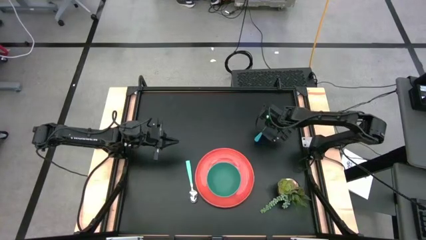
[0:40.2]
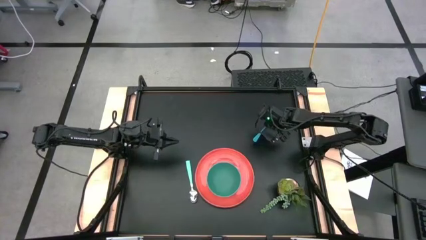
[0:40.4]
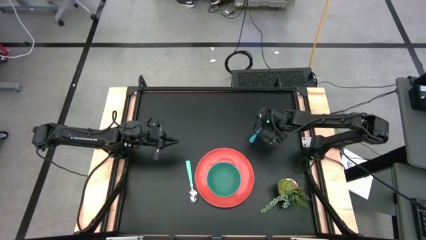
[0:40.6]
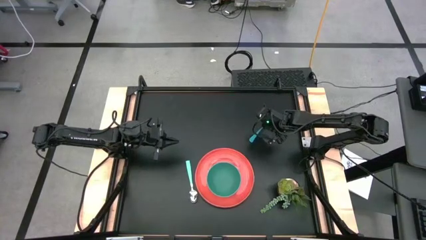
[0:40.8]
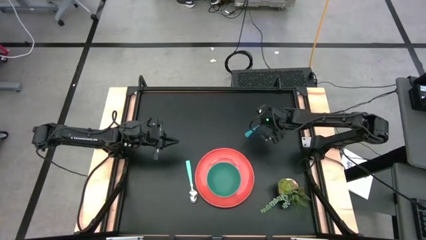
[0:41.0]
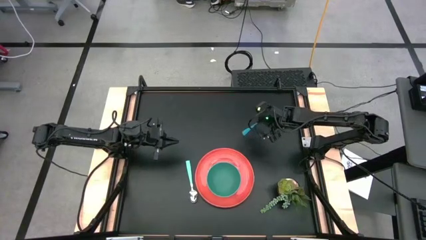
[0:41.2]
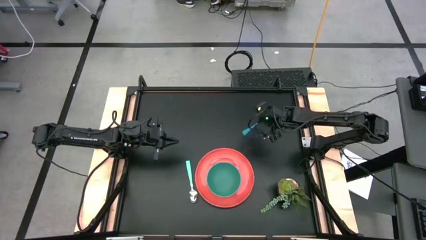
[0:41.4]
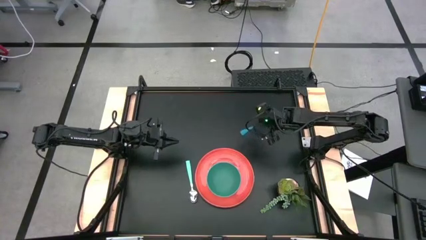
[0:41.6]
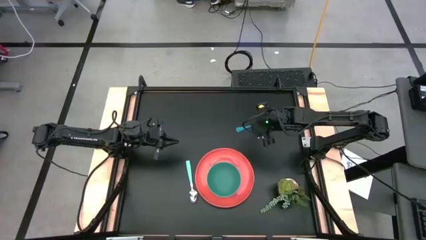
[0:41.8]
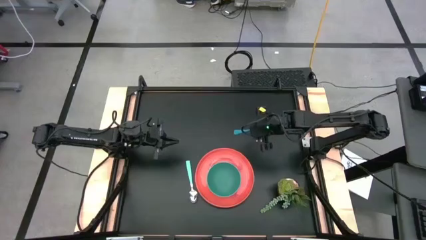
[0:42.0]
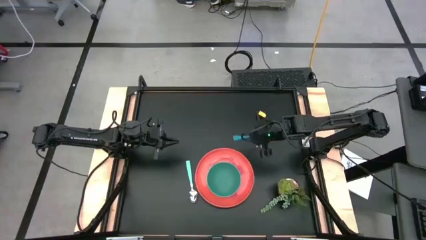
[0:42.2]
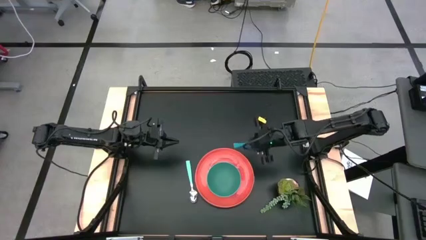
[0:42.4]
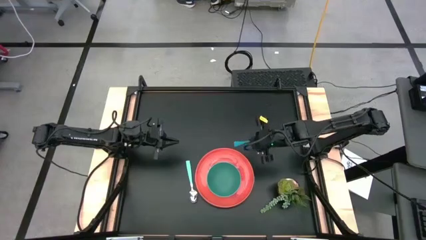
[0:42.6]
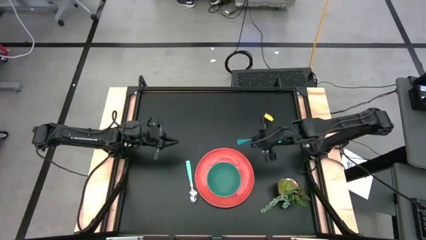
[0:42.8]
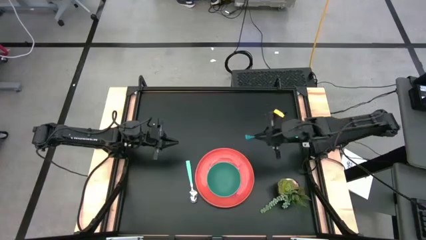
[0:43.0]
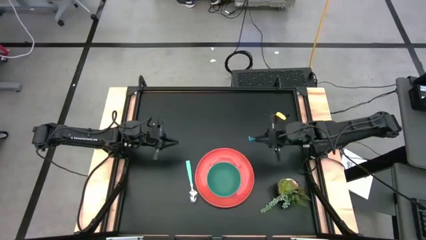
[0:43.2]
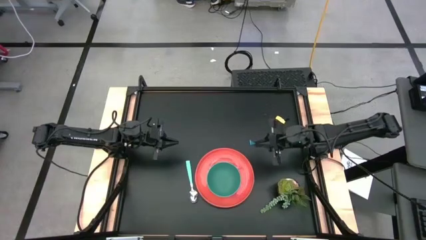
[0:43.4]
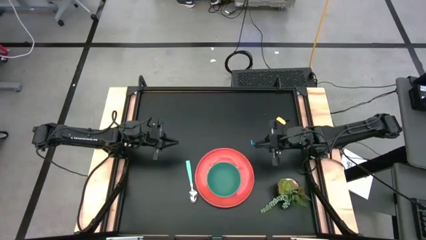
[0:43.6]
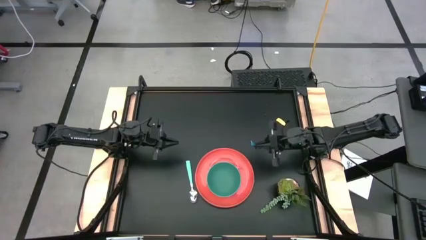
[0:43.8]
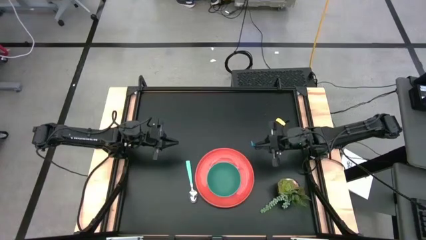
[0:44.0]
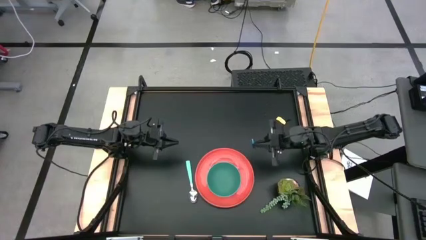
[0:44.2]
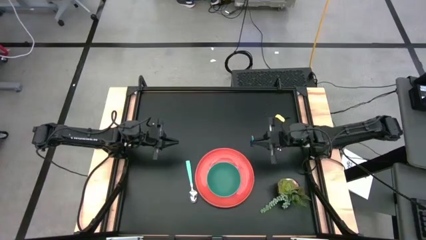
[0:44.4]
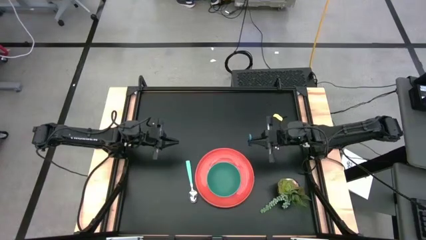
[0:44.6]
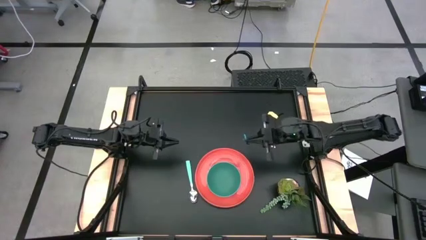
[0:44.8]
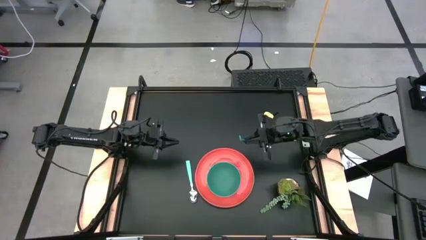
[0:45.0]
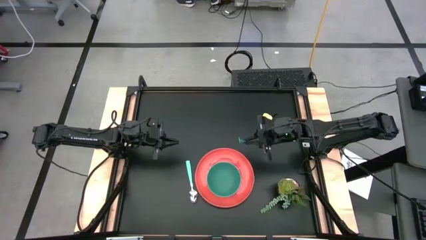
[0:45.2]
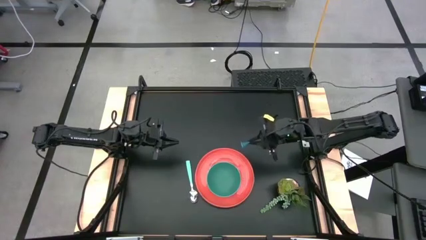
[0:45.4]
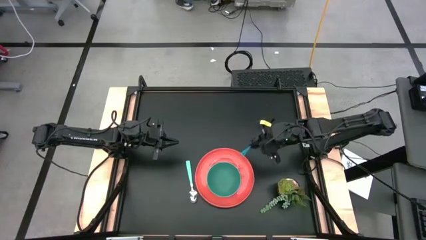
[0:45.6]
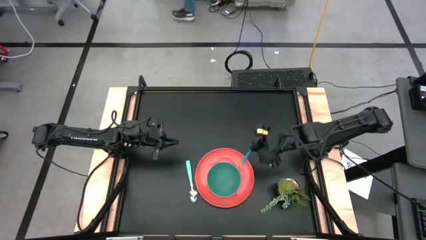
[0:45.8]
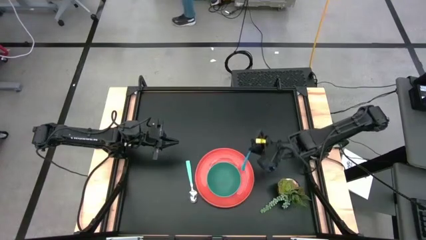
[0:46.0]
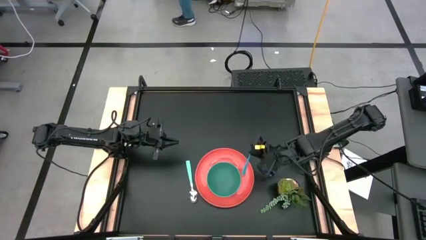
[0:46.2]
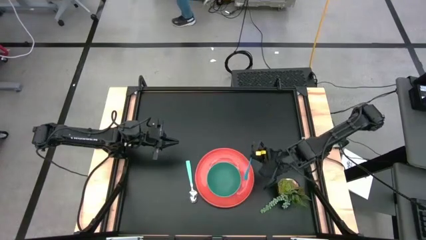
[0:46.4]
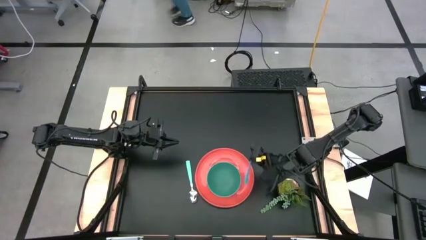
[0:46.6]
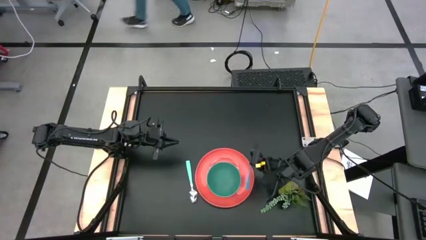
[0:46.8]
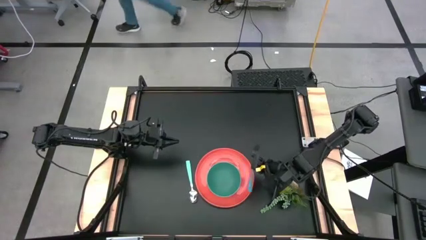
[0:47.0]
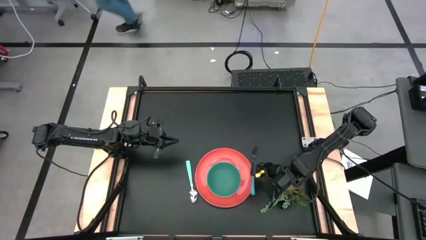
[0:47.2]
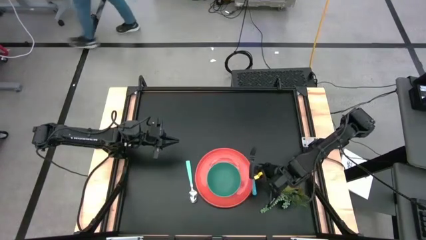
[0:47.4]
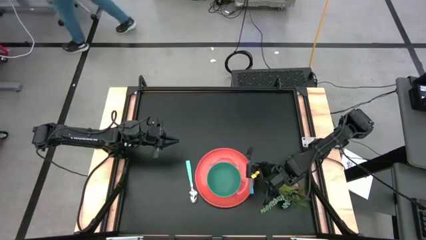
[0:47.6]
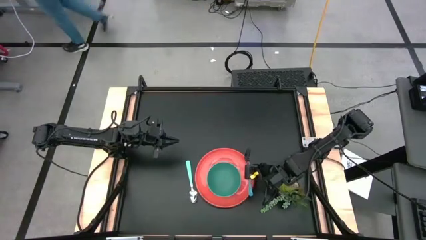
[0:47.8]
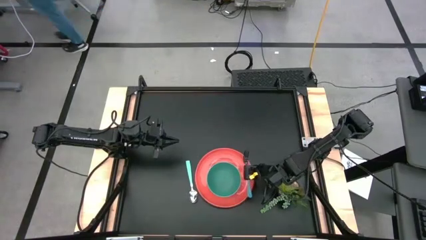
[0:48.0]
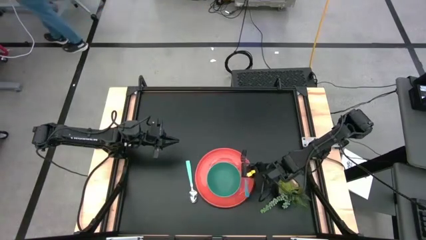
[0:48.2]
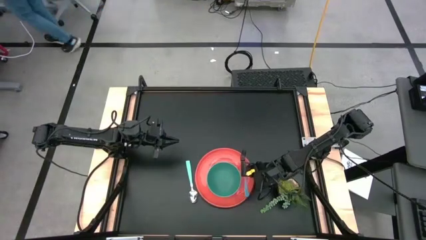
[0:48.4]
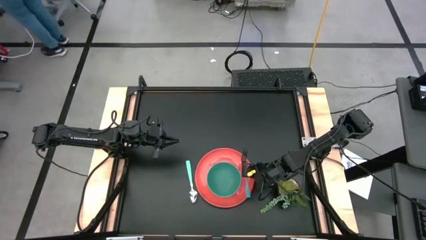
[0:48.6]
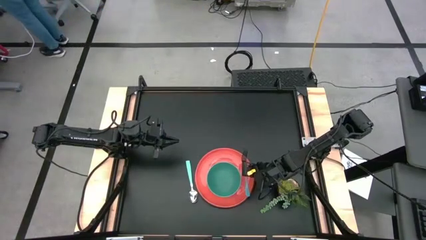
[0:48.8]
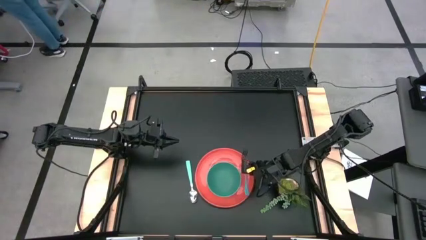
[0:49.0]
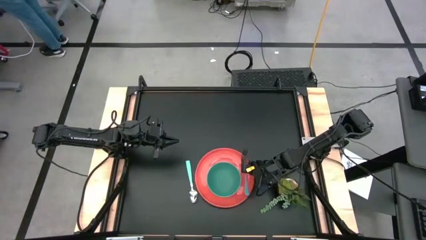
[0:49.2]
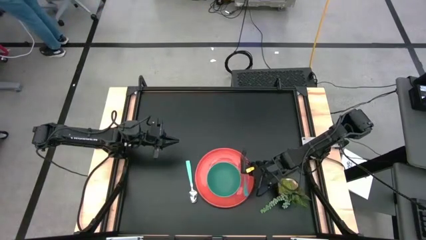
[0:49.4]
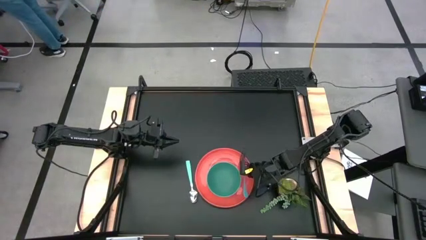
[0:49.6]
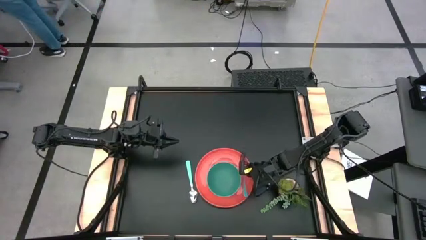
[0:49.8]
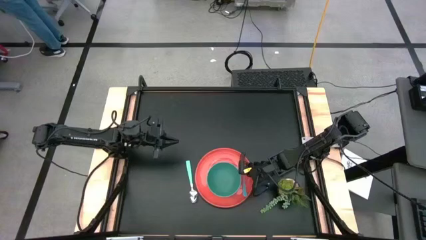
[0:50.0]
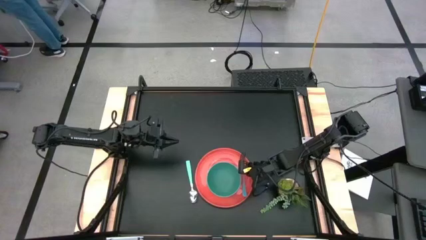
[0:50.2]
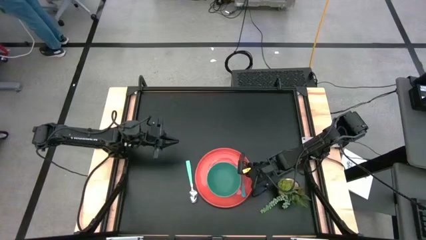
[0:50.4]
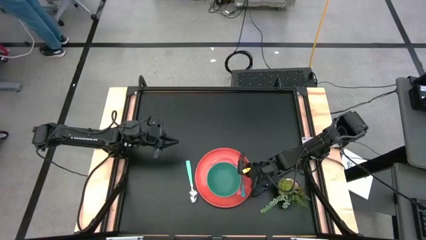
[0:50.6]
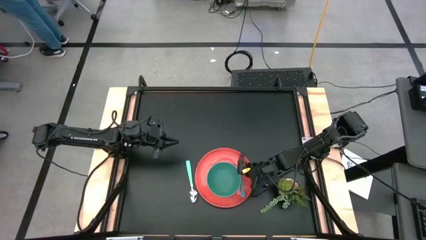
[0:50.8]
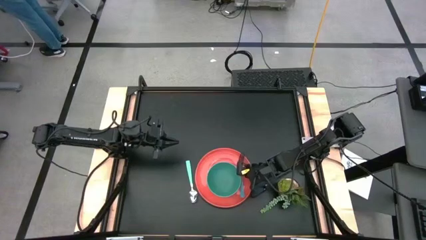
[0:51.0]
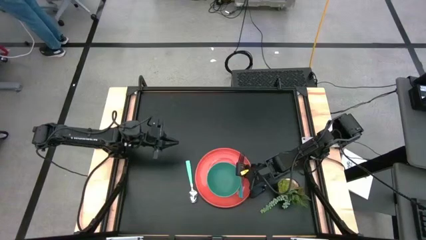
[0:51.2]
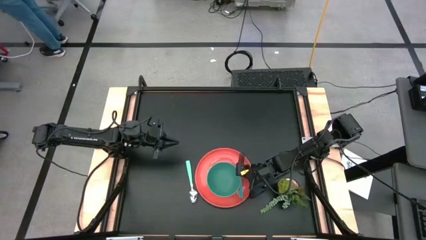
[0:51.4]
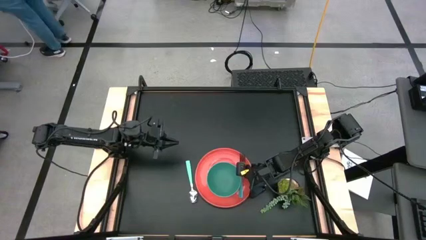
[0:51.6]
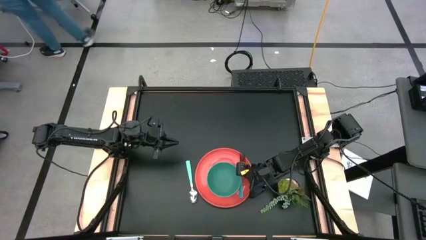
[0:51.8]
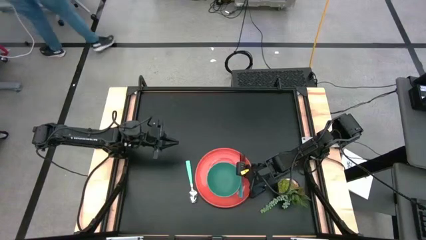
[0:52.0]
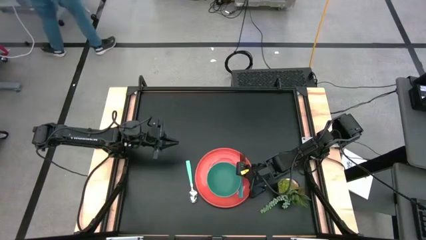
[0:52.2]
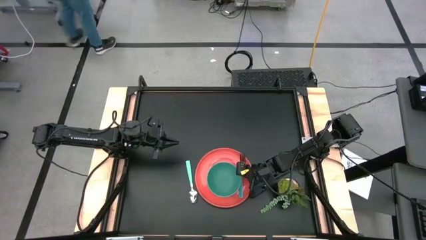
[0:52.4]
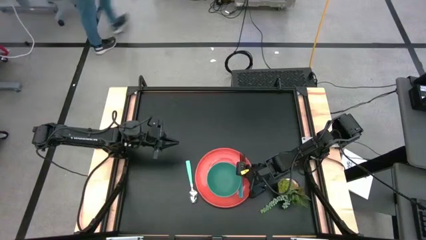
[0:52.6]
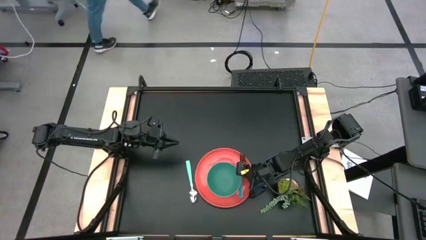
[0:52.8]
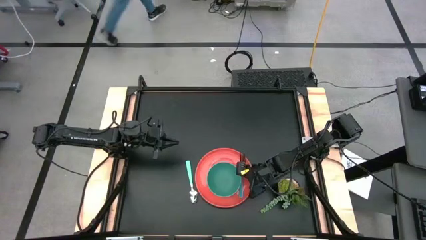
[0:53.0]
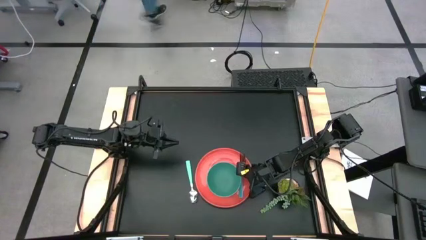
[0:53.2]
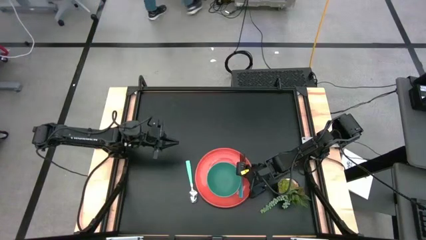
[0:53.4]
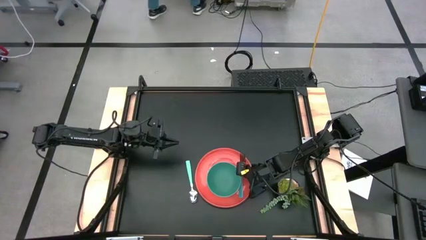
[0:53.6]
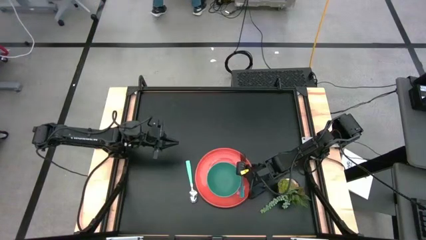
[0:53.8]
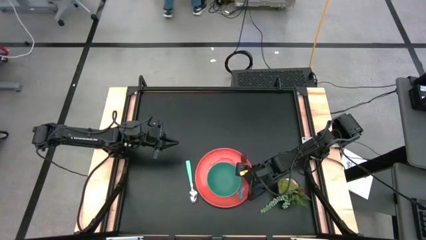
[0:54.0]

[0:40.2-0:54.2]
Task: Set table place
Put the light blue fork on the orange plate to the right of the green bowl
